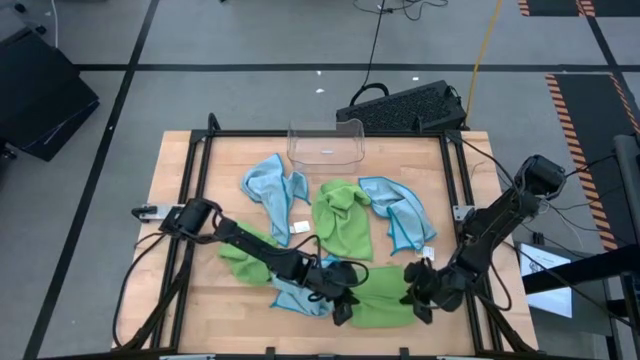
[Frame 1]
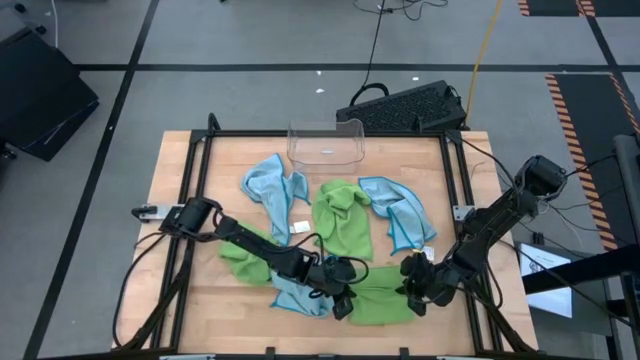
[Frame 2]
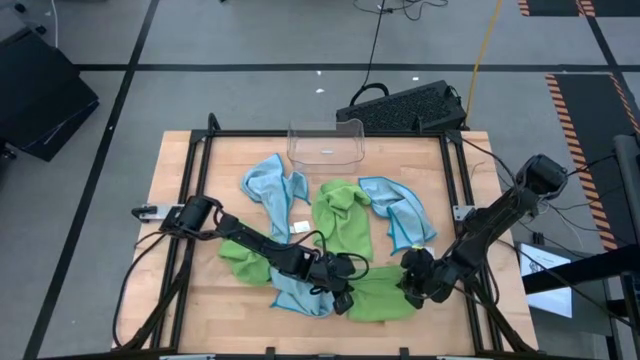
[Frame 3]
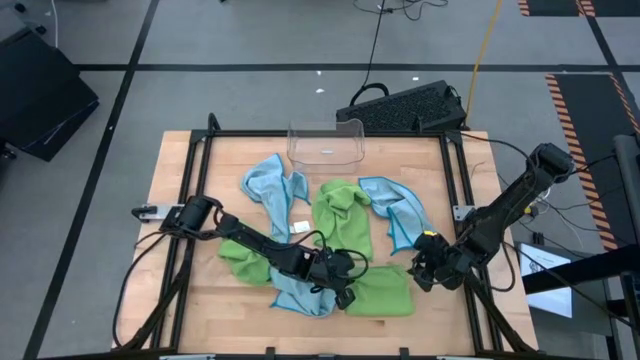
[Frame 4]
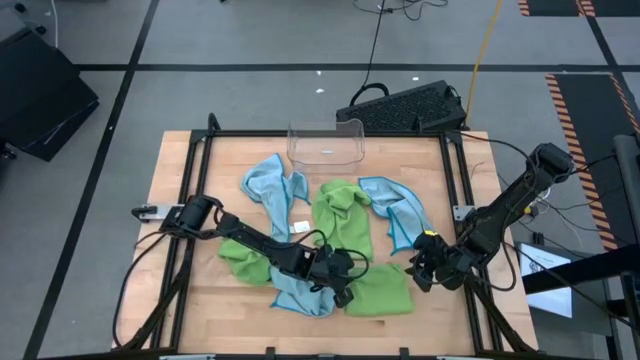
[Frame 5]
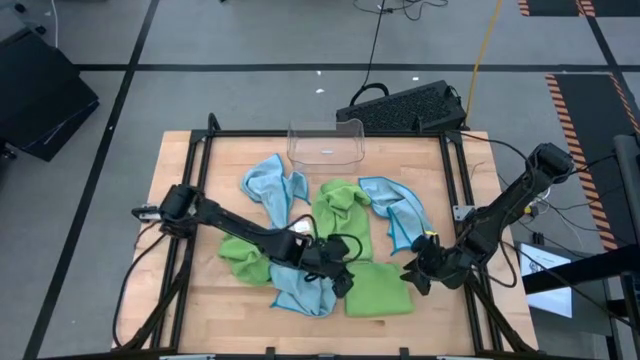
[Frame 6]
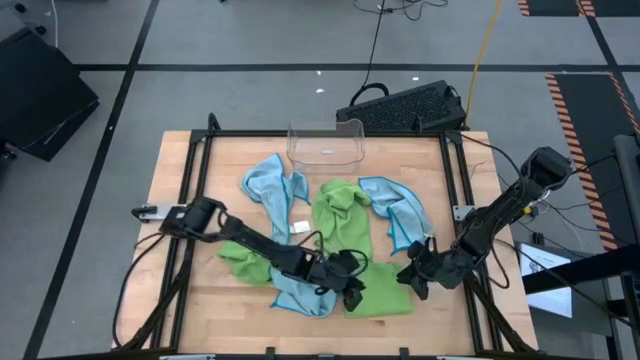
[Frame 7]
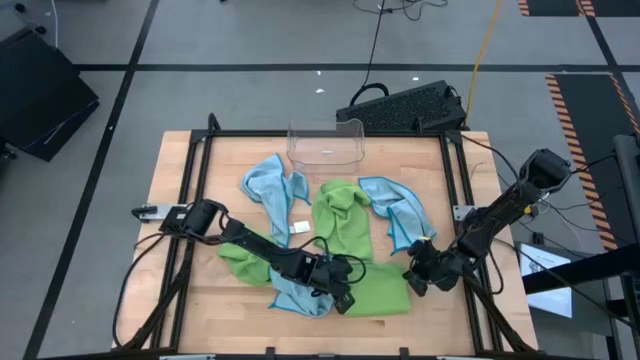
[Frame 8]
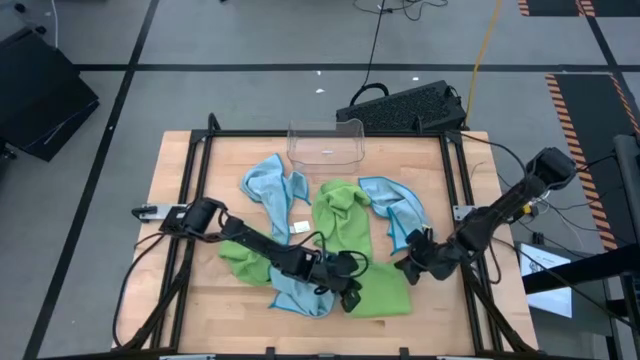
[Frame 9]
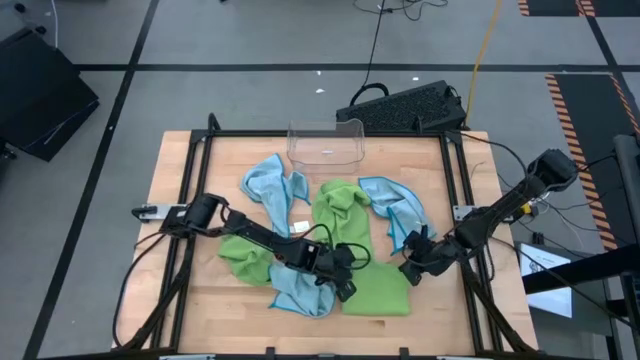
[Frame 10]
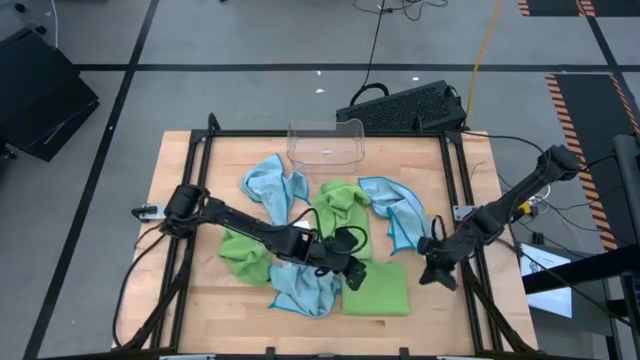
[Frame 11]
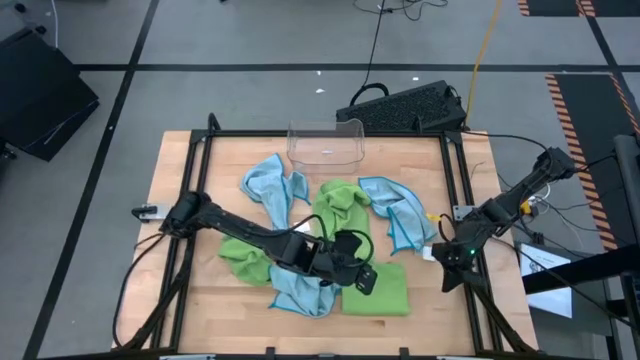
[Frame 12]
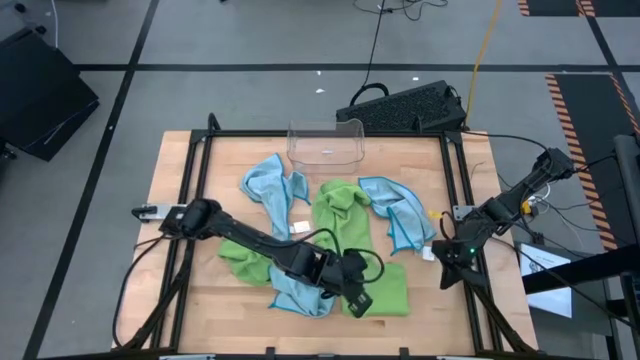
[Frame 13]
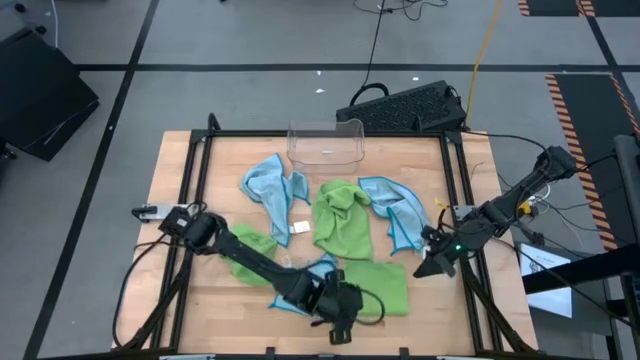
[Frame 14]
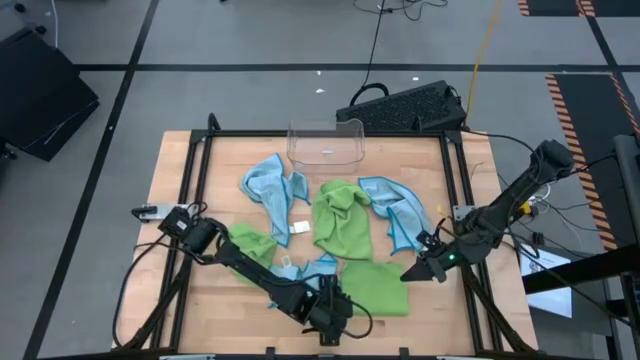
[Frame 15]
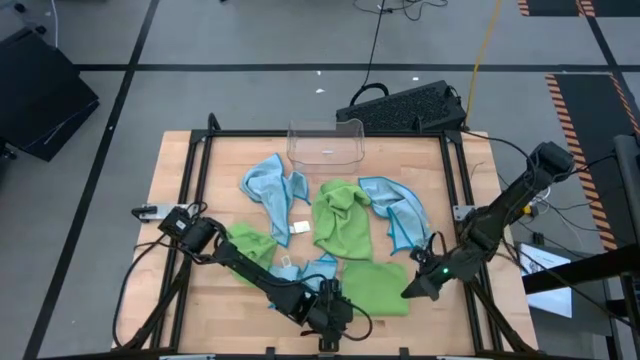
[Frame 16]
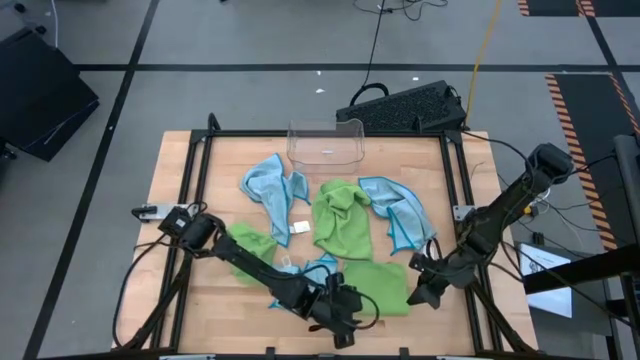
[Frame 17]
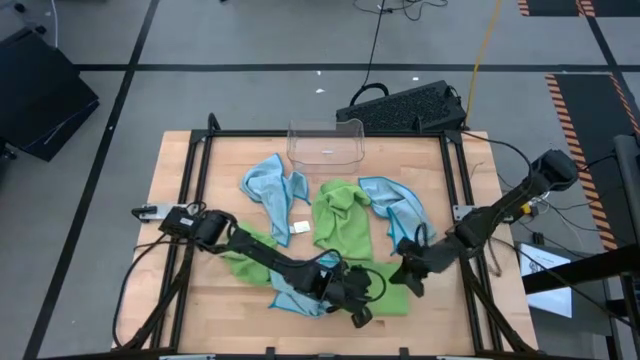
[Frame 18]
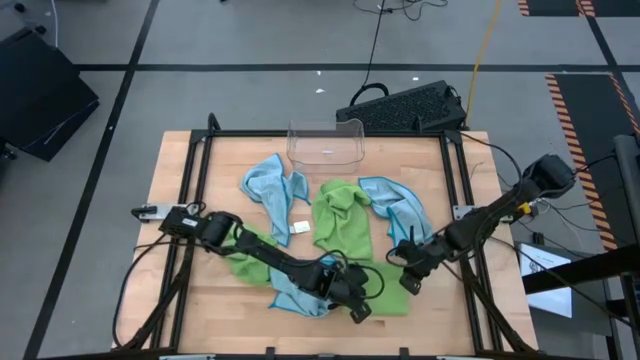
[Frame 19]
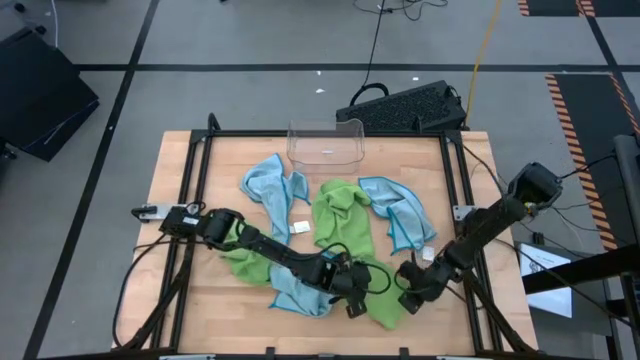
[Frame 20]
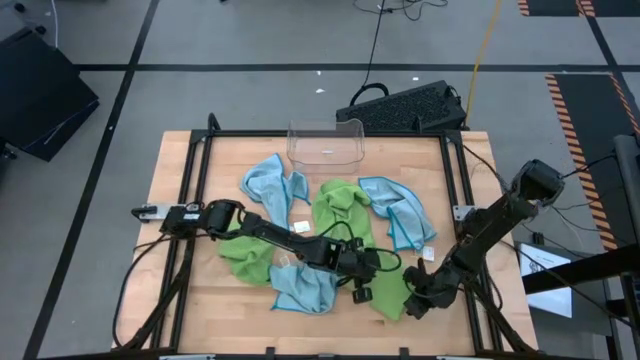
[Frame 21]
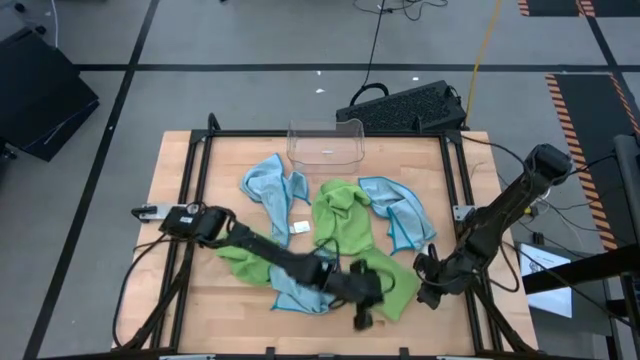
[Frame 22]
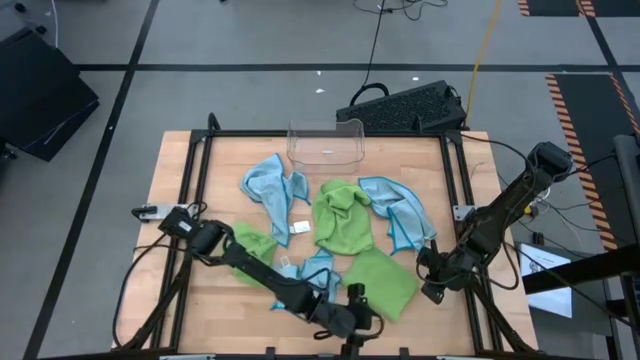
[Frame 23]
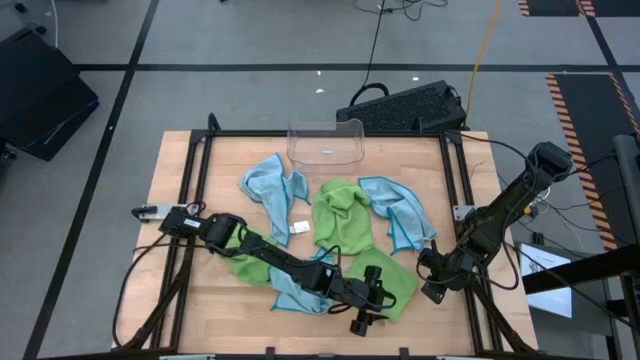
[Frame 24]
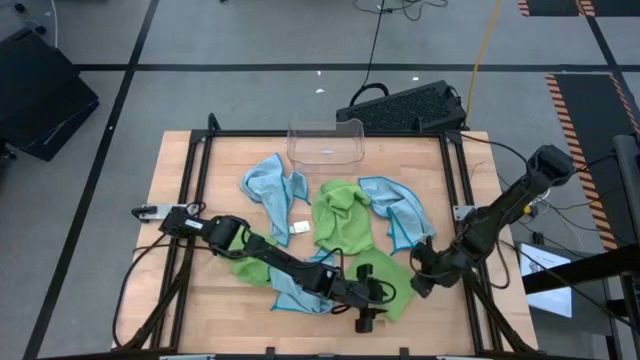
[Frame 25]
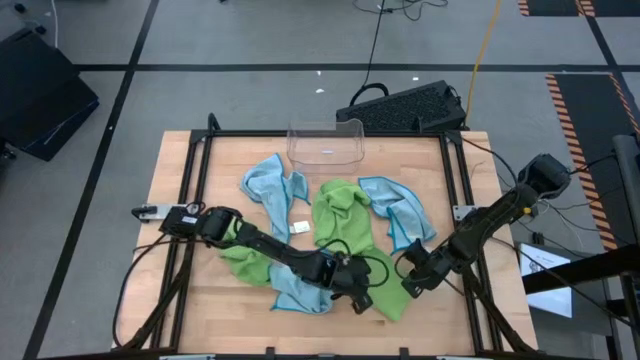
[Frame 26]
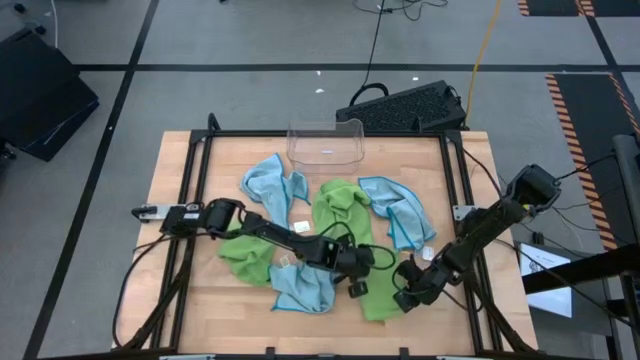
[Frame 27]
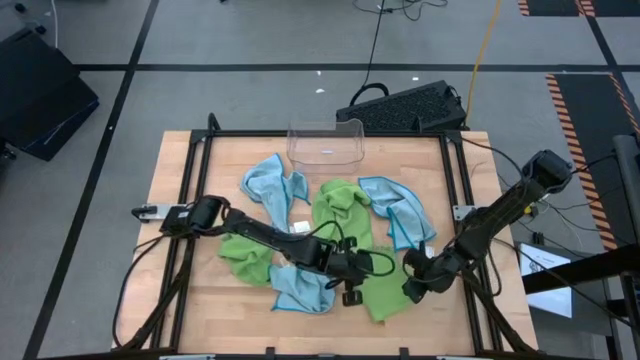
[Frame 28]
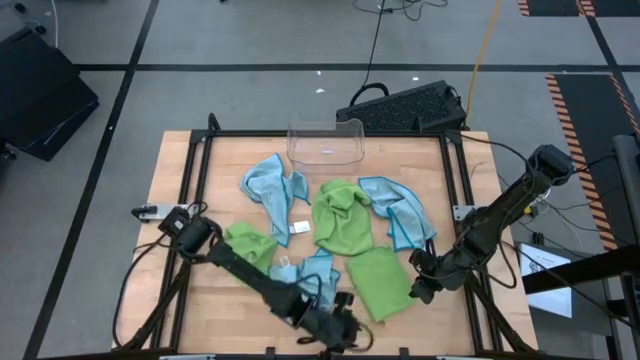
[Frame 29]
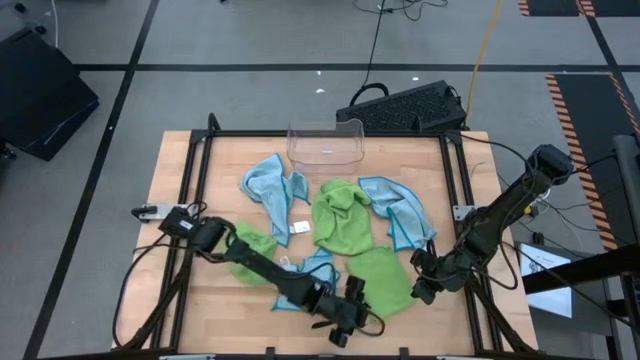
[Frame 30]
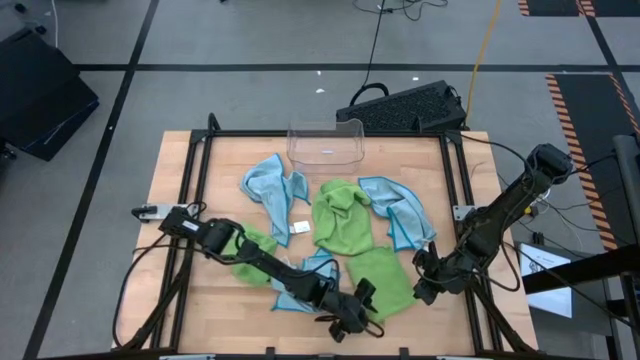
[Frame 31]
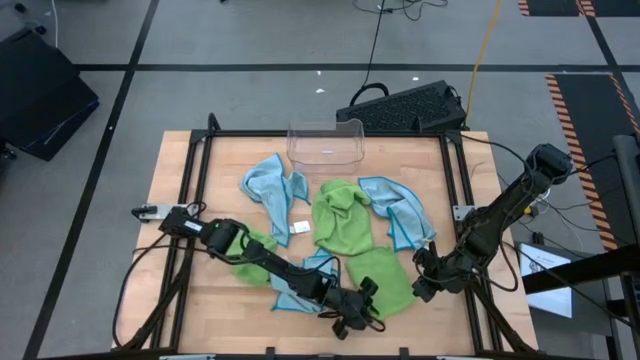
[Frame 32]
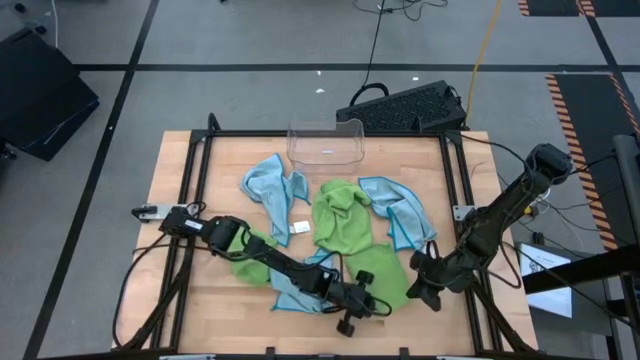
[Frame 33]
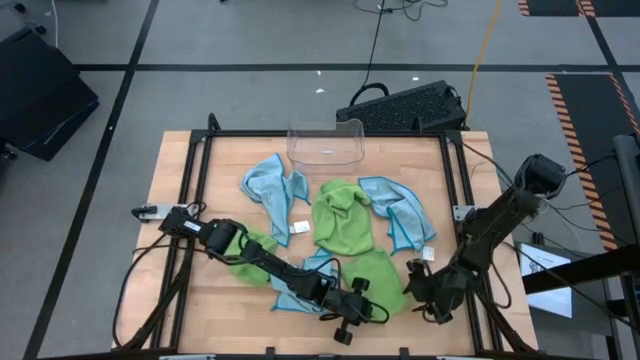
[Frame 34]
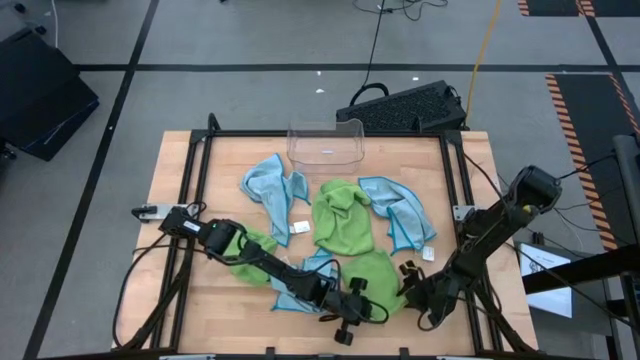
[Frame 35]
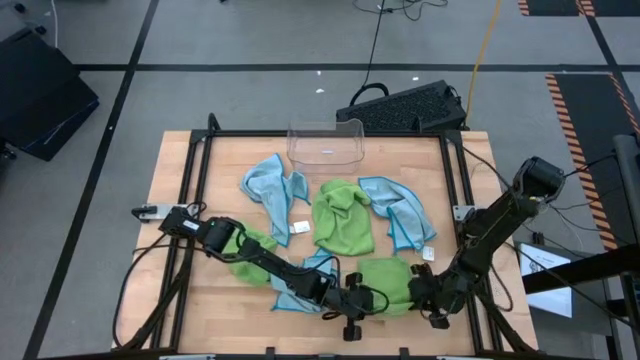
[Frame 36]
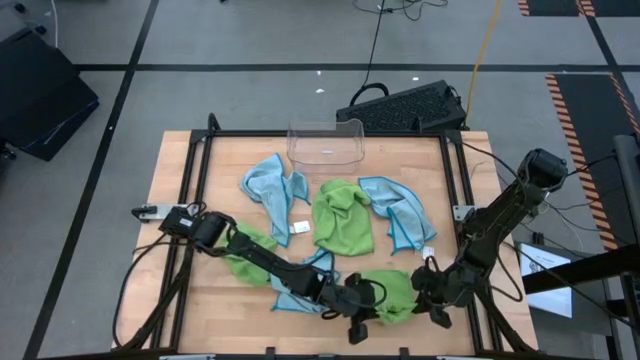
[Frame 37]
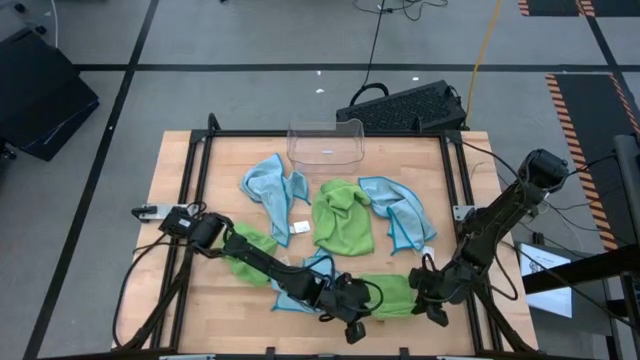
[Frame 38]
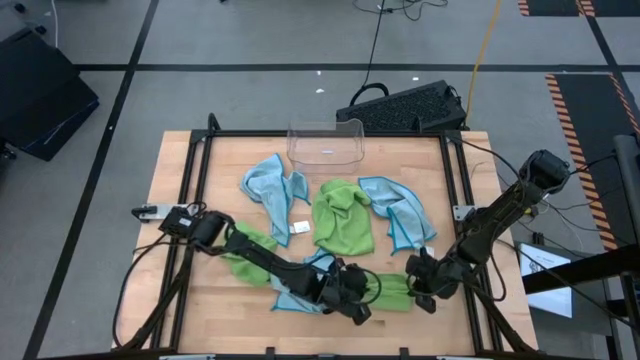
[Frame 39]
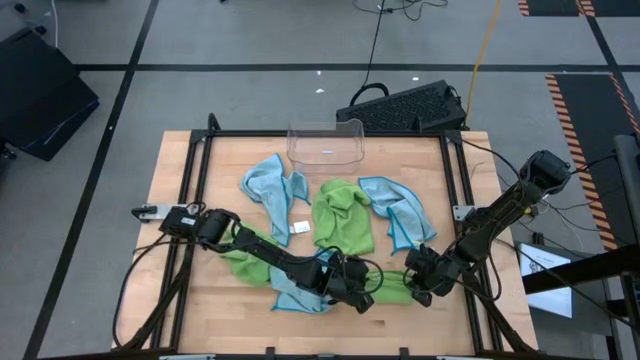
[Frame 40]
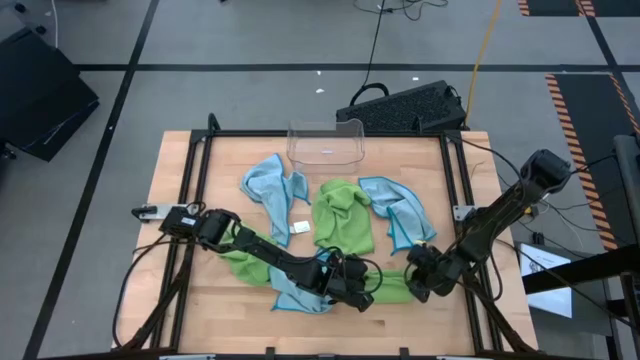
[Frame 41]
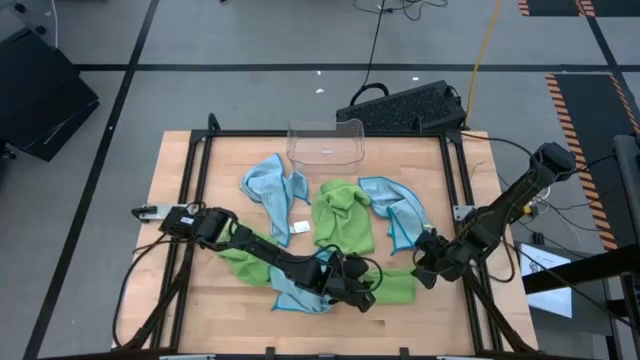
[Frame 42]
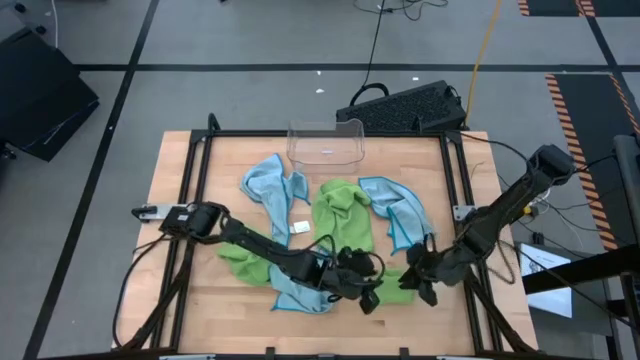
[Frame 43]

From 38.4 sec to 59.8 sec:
Task: Fold microfiber towels
Fold the bottom right green microfiber cloth
